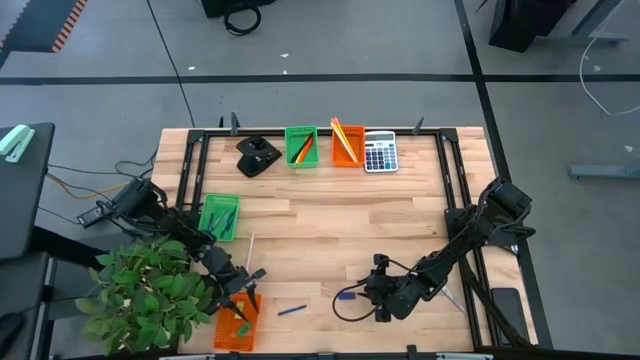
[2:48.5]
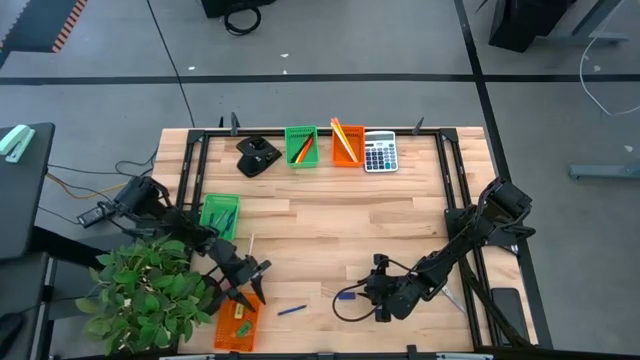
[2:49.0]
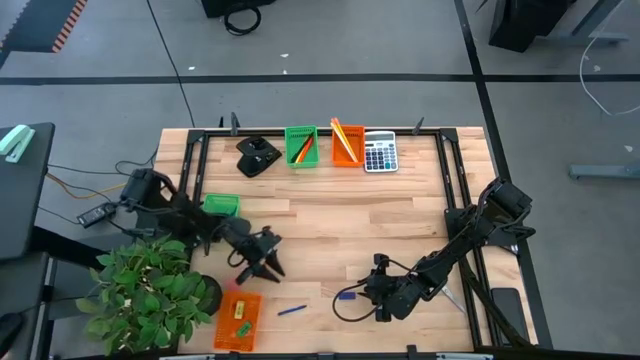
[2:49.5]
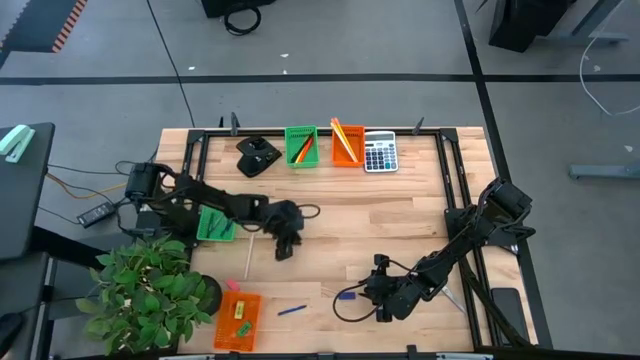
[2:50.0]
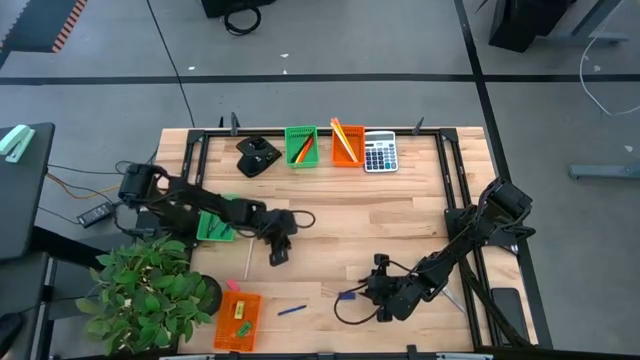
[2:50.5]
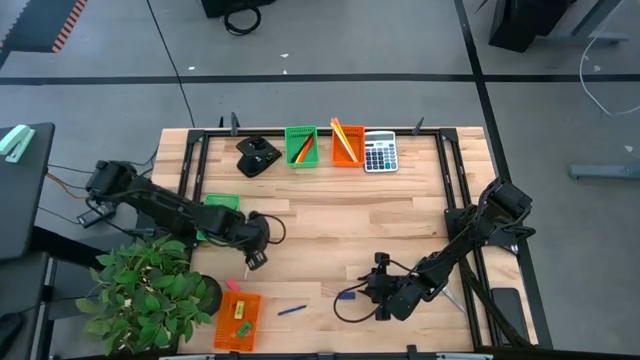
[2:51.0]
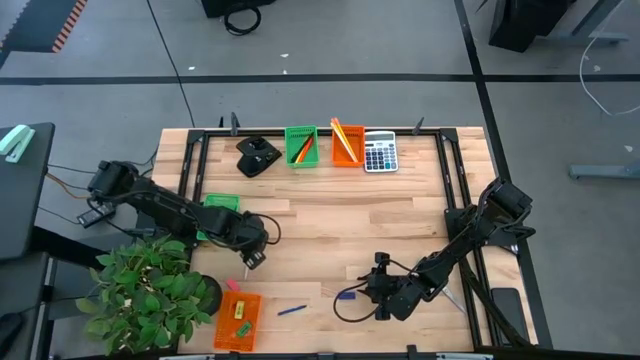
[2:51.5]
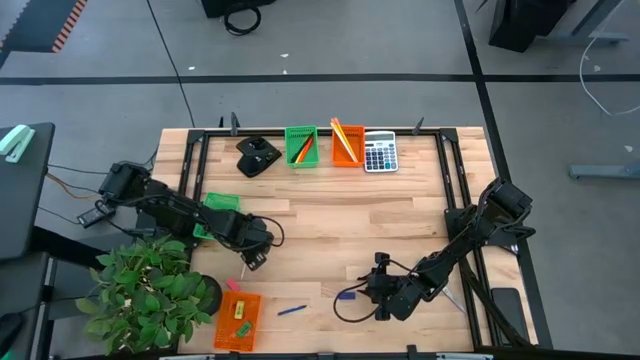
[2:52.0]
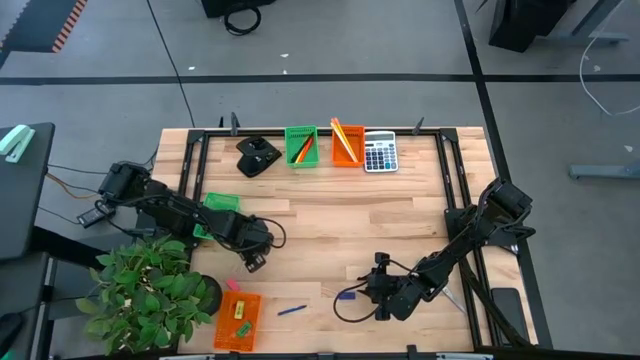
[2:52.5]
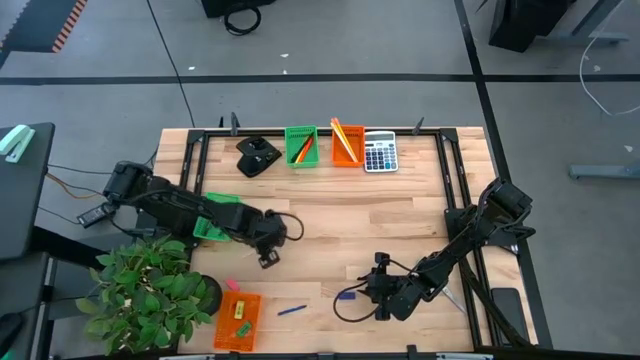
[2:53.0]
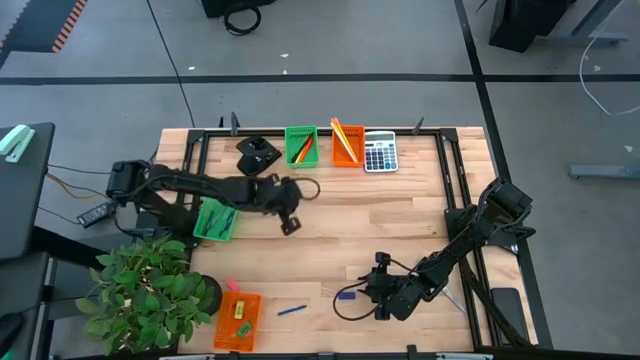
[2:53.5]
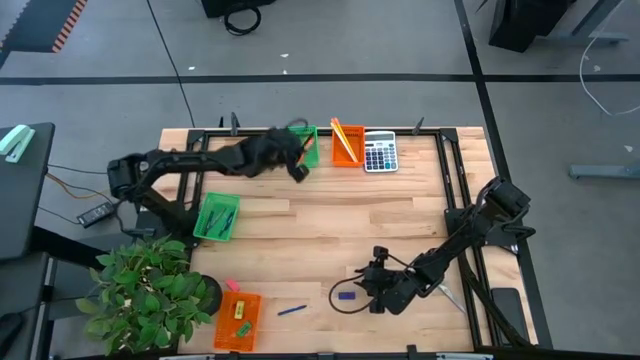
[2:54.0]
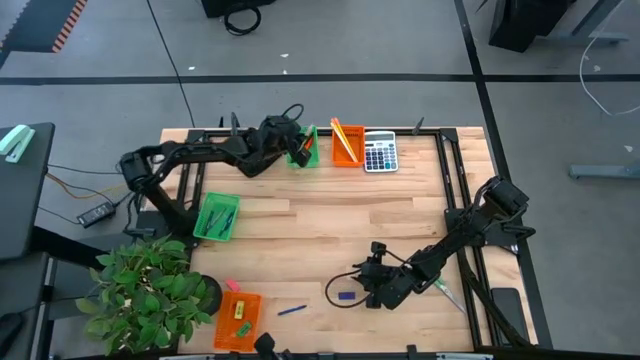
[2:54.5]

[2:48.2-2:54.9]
Task: Sort crayons/erasers/pens/pencils in bins
Put the pink pen into the bottom green bin

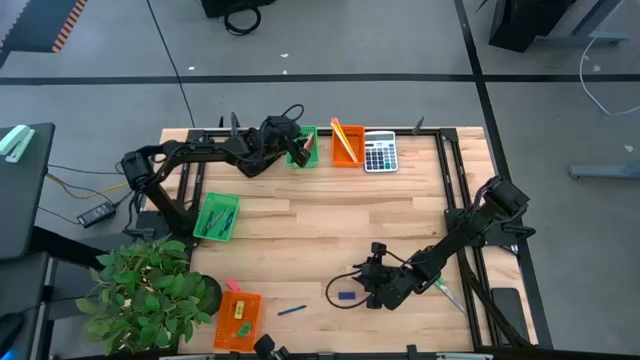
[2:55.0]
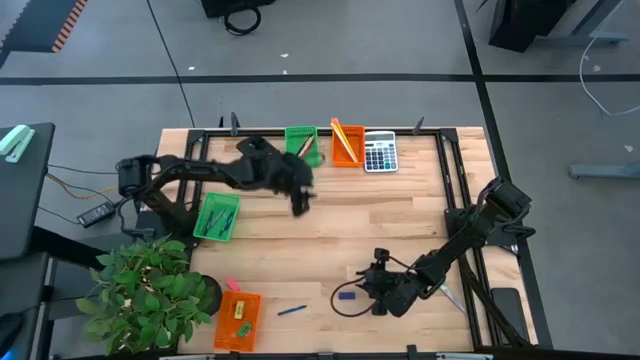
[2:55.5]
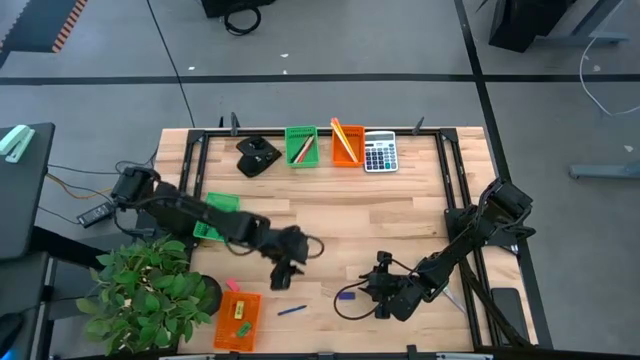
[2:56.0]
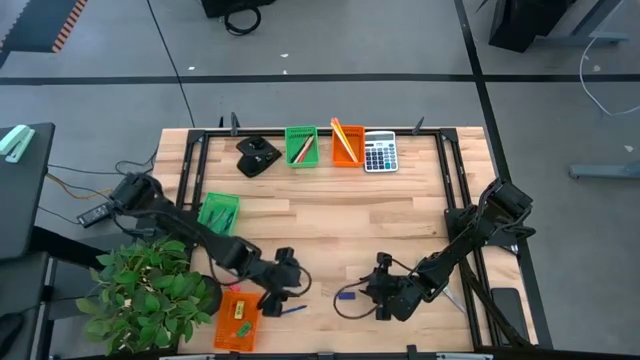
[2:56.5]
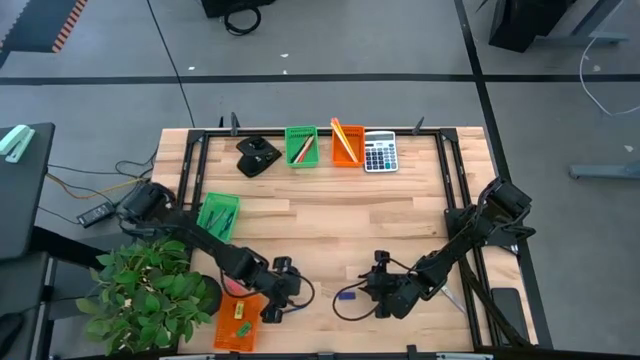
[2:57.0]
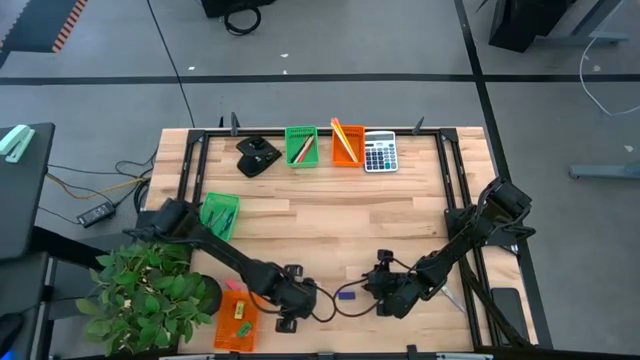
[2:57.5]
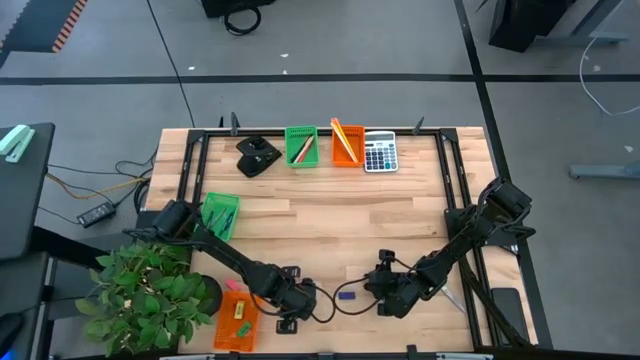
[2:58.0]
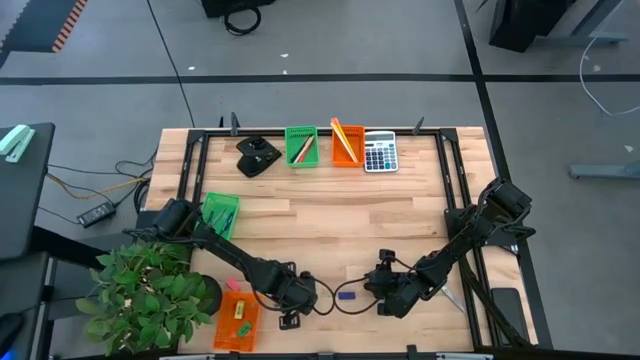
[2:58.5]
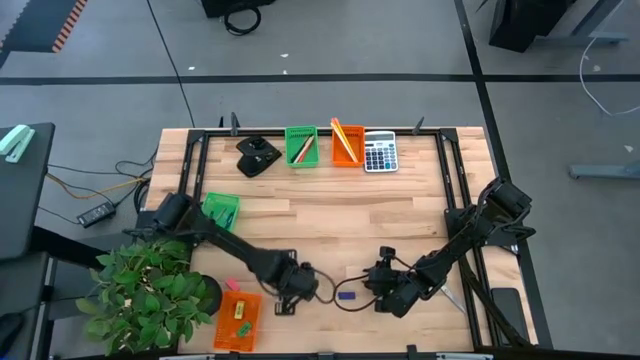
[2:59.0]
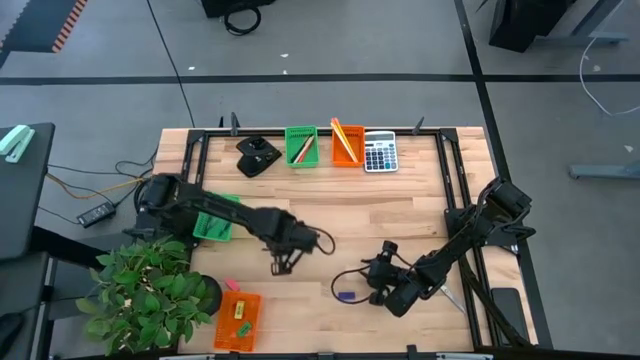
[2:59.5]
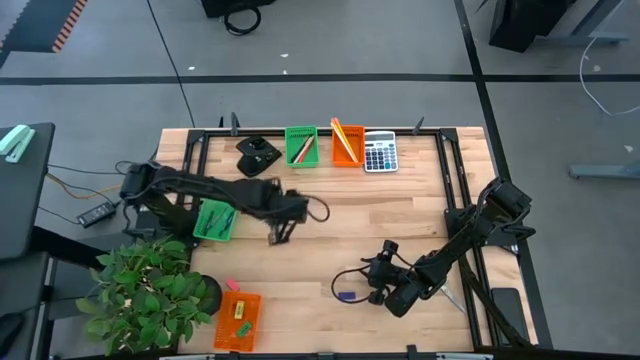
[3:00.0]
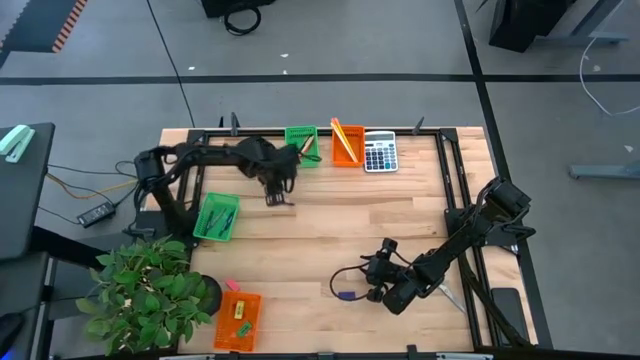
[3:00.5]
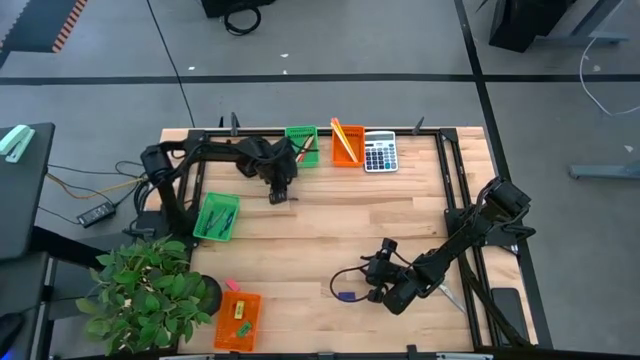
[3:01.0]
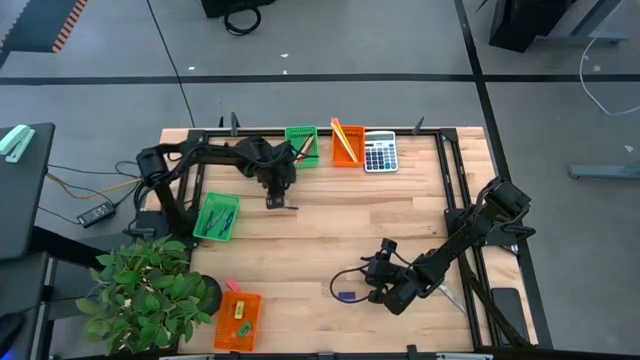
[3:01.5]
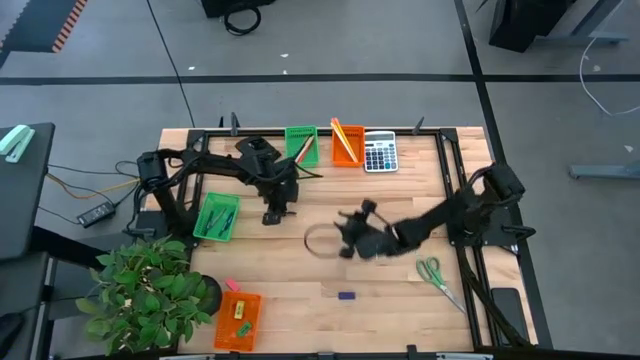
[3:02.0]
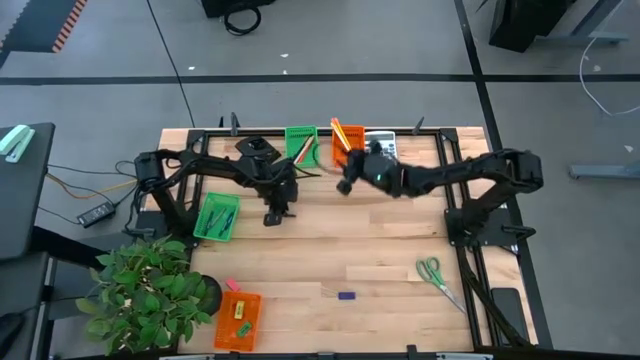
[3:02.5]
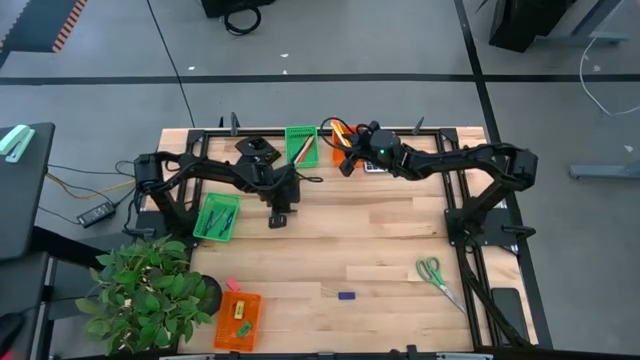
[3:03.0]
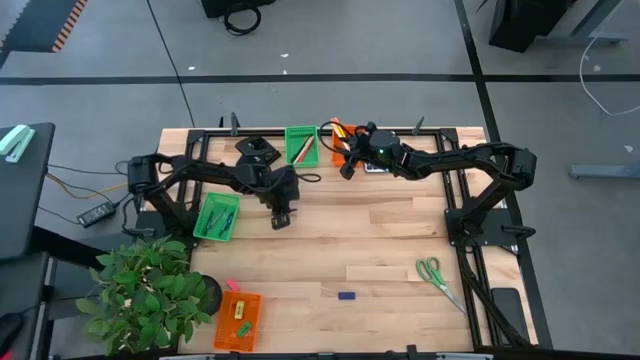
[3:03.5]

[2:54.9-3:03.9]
Put the blue crayon into the bottom green bin

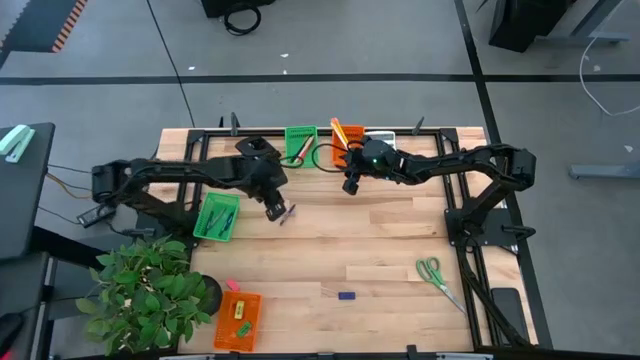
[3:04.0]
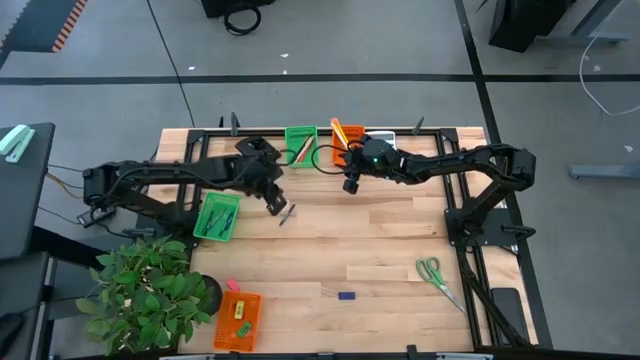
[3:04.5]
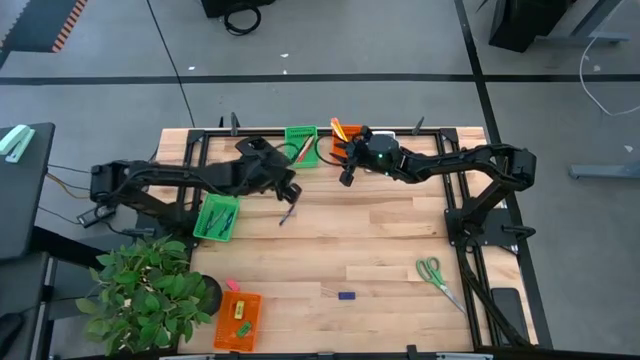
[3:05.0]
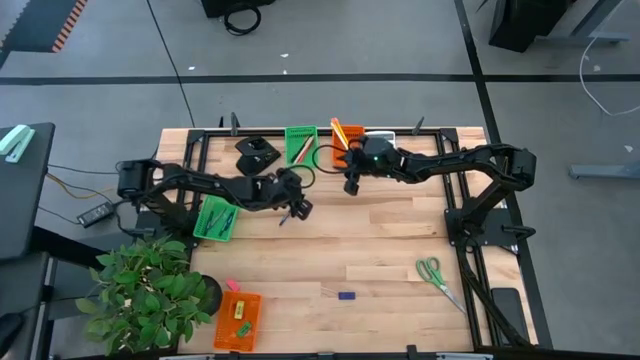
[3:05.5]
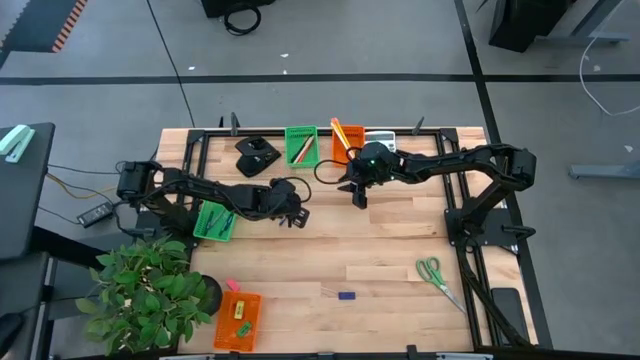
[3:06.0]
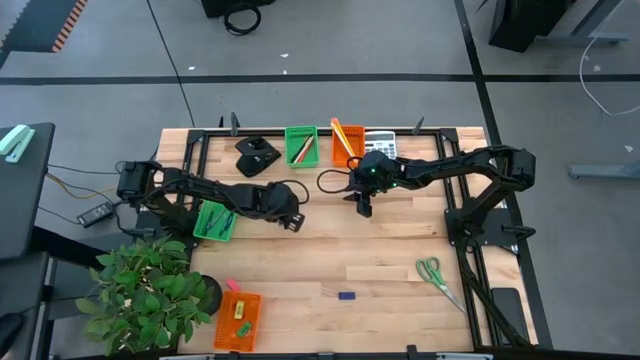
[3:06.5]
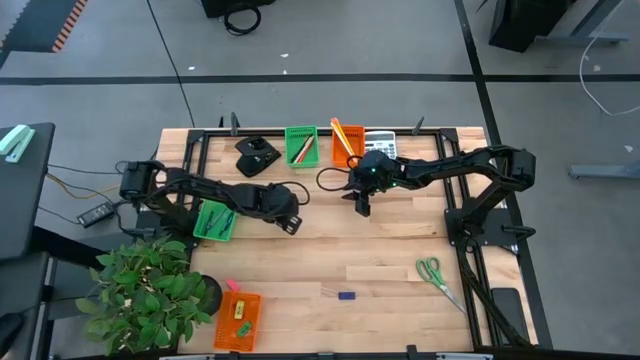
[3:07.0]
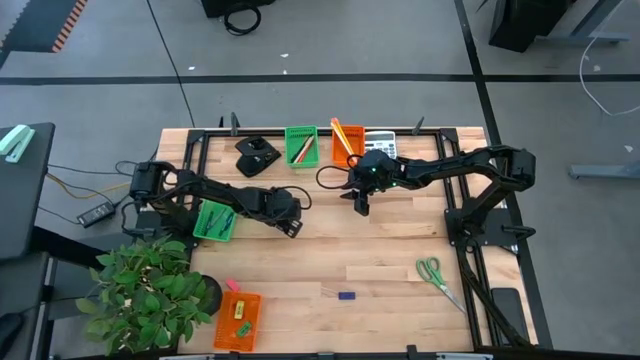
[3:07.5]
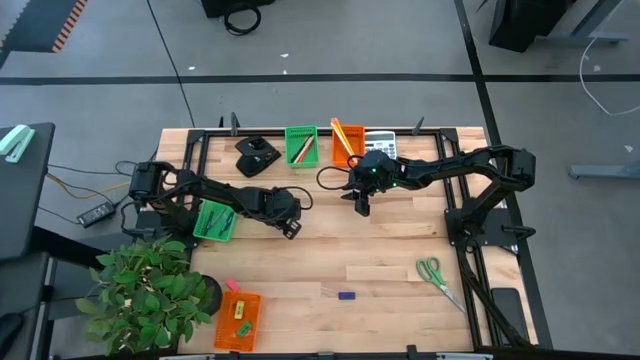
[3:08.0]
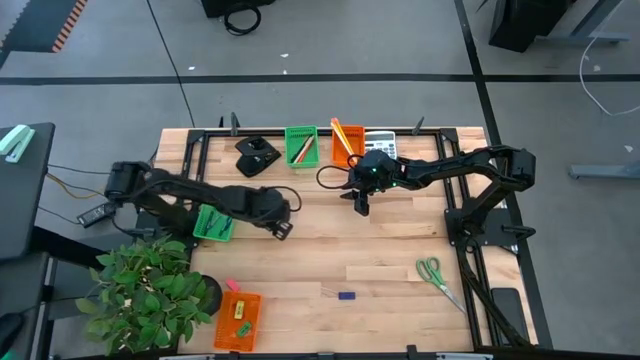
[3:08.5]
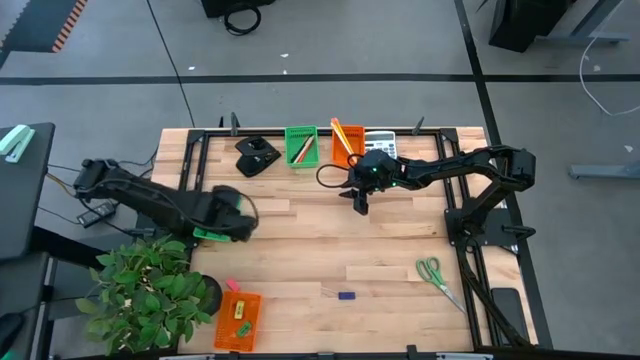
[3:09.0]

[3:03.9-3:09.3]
Put the blue crayon into the bottom green bin
